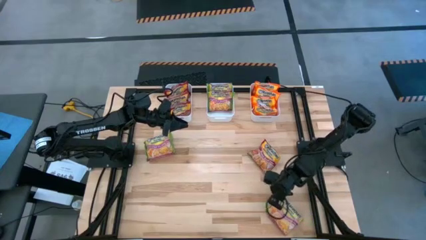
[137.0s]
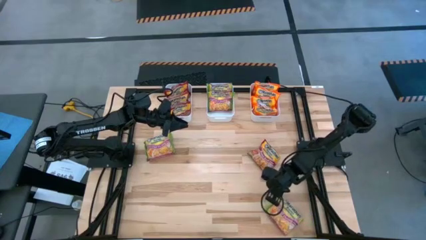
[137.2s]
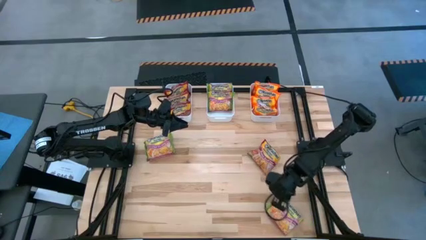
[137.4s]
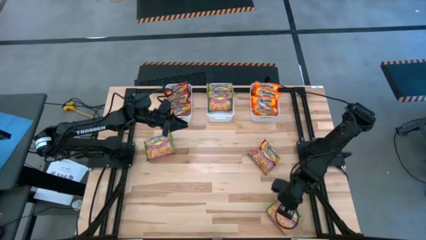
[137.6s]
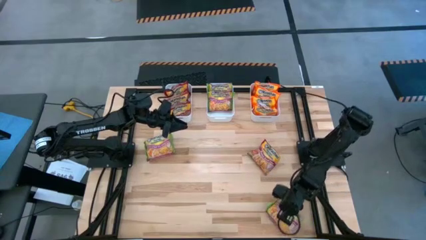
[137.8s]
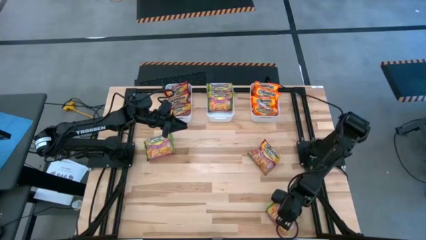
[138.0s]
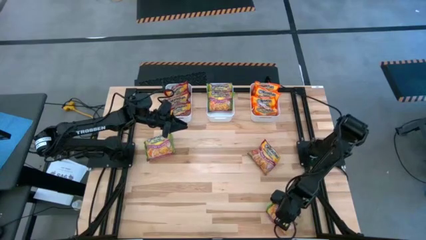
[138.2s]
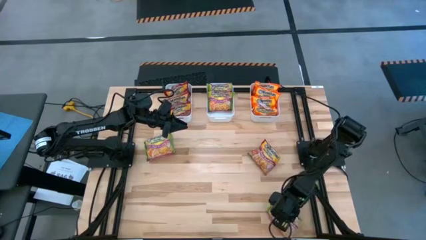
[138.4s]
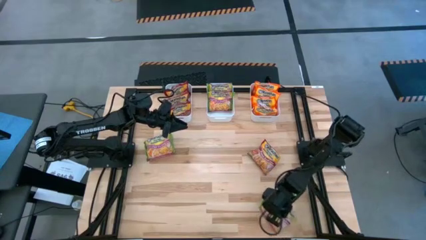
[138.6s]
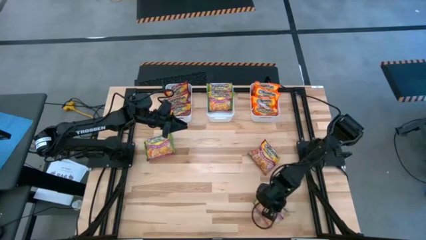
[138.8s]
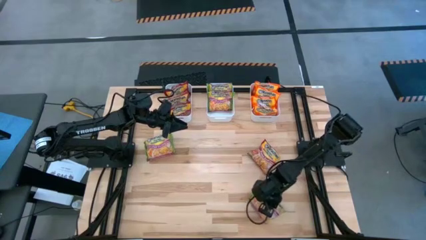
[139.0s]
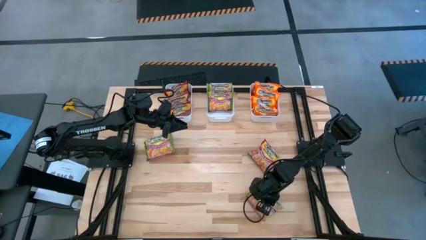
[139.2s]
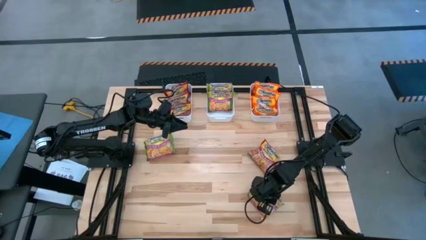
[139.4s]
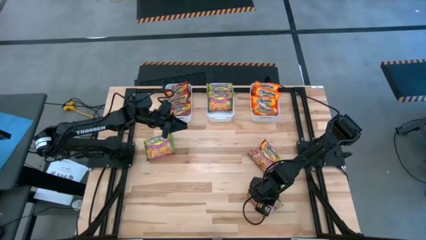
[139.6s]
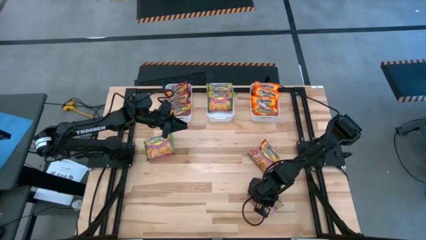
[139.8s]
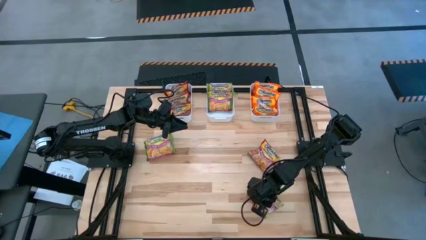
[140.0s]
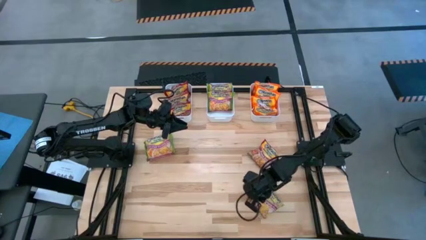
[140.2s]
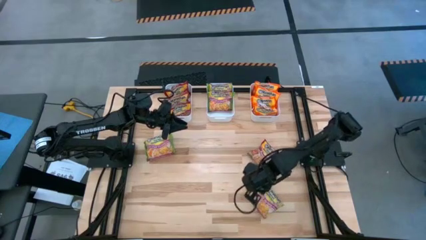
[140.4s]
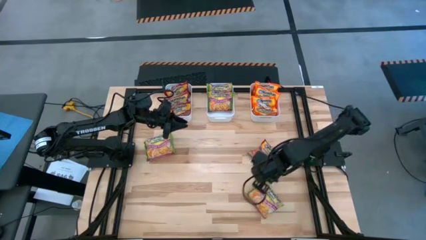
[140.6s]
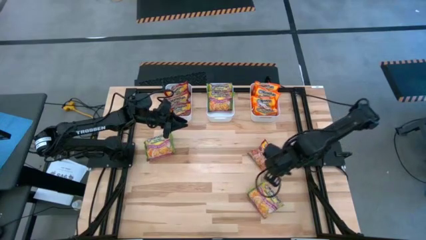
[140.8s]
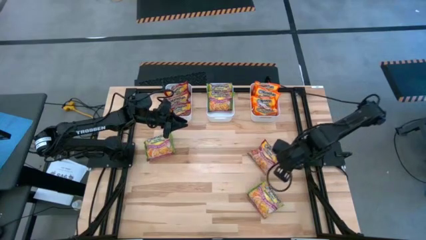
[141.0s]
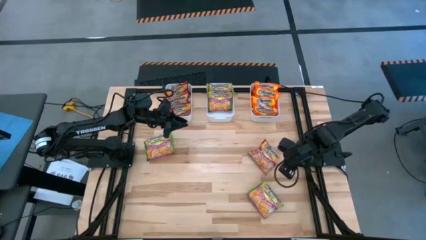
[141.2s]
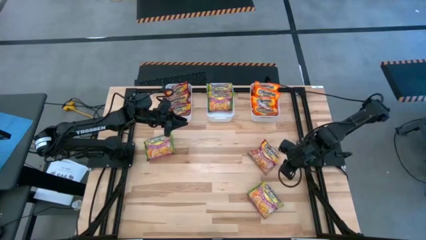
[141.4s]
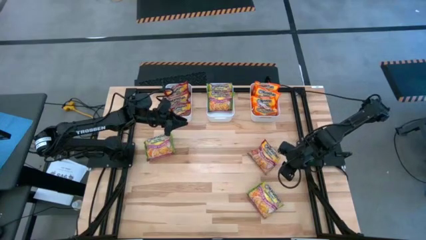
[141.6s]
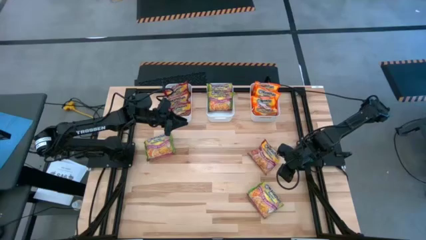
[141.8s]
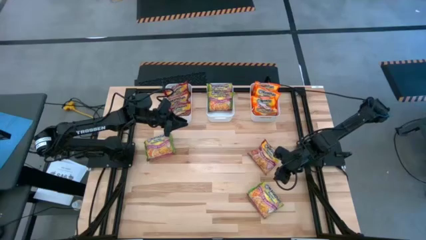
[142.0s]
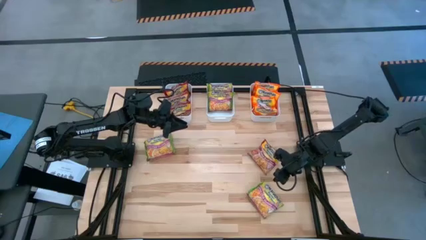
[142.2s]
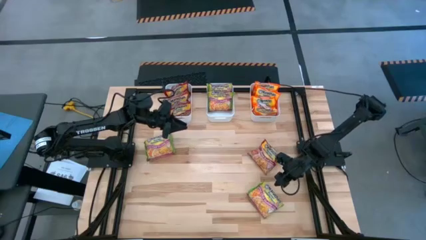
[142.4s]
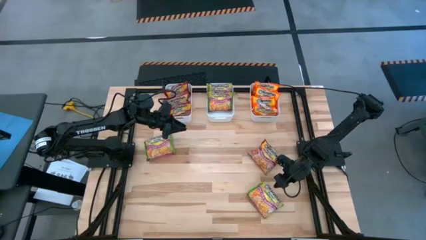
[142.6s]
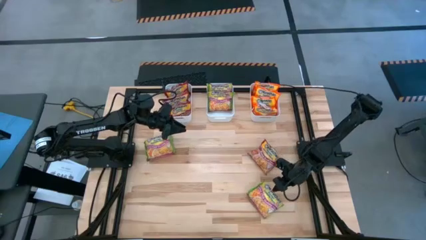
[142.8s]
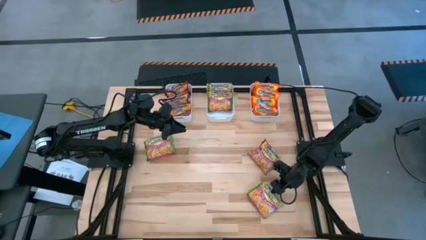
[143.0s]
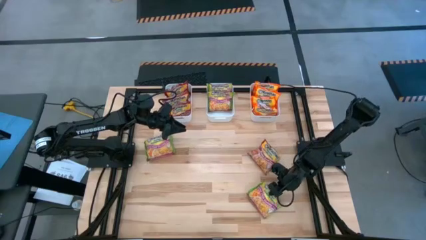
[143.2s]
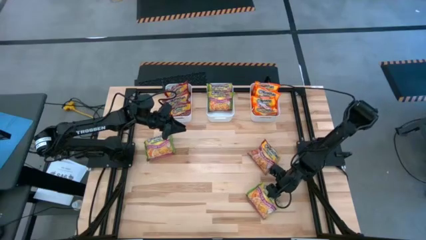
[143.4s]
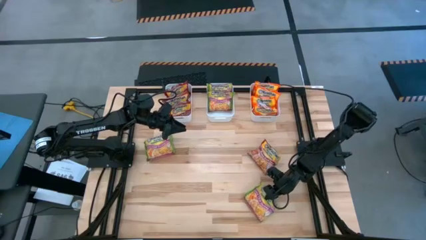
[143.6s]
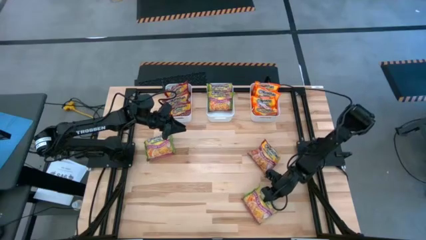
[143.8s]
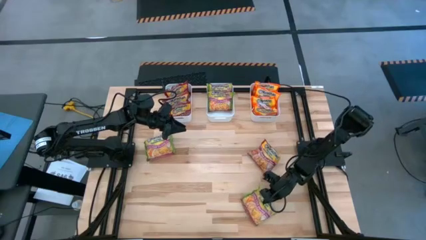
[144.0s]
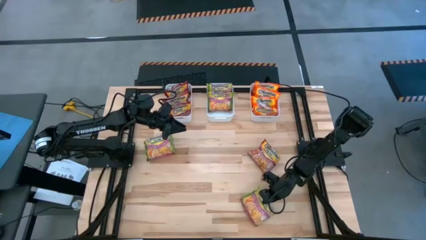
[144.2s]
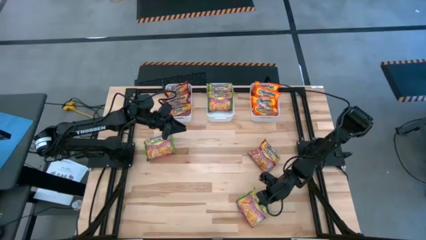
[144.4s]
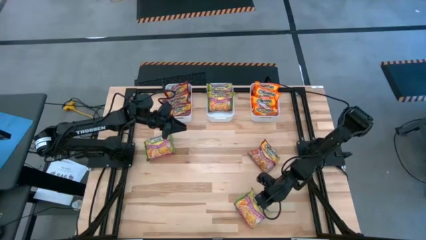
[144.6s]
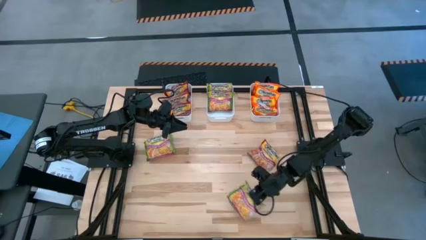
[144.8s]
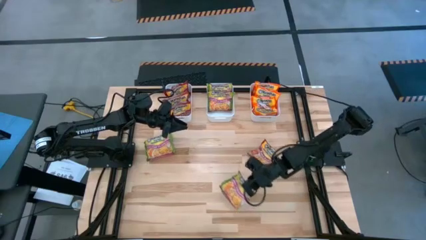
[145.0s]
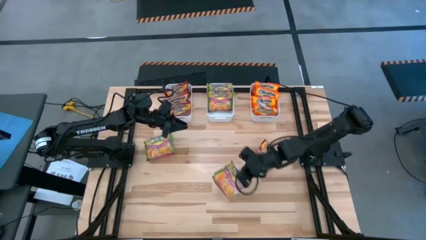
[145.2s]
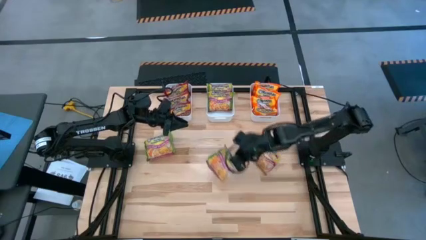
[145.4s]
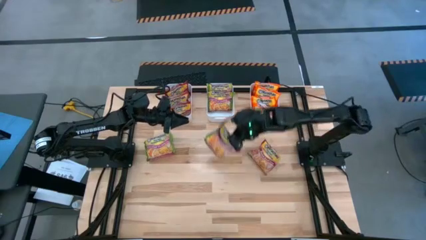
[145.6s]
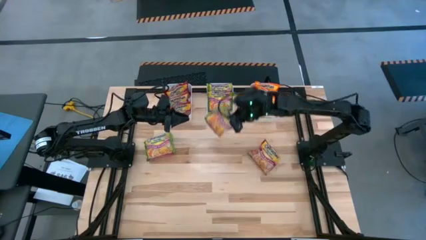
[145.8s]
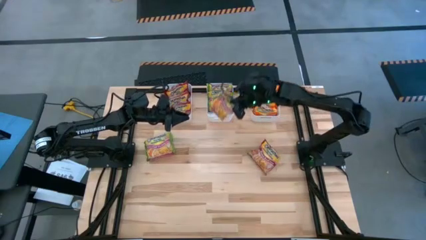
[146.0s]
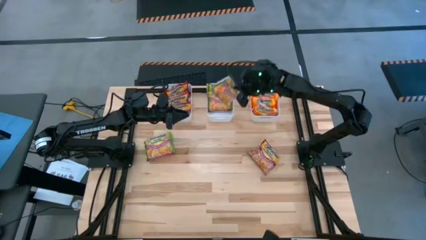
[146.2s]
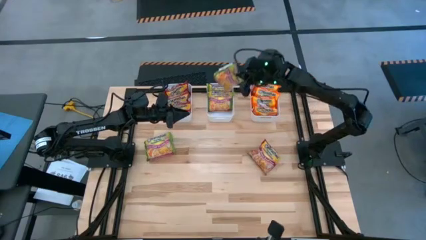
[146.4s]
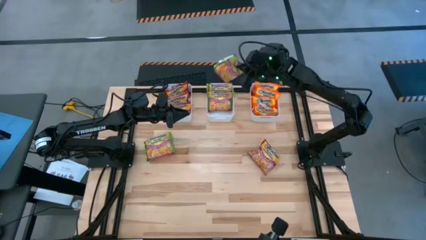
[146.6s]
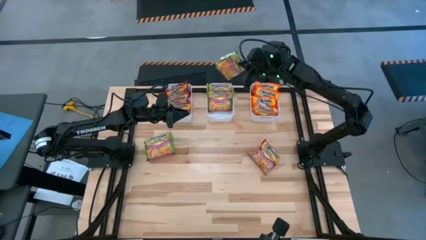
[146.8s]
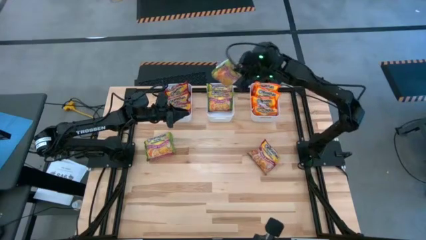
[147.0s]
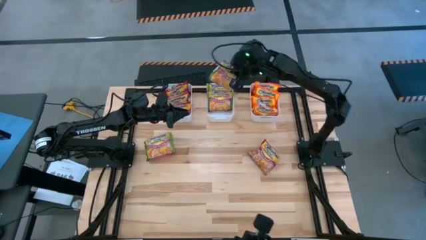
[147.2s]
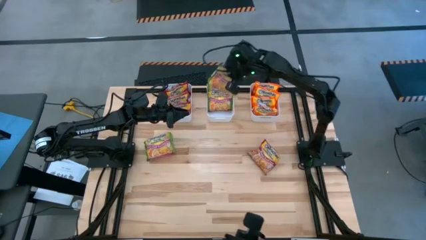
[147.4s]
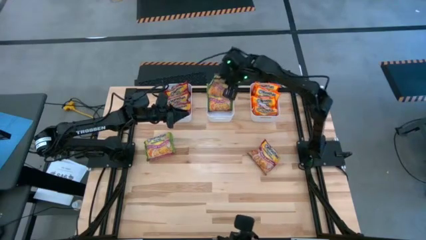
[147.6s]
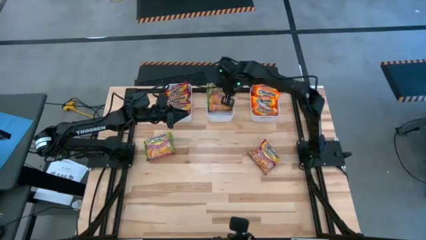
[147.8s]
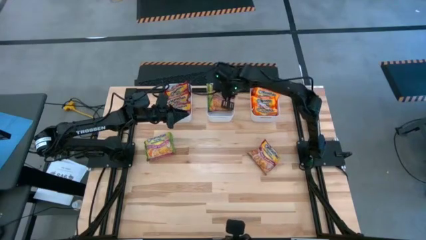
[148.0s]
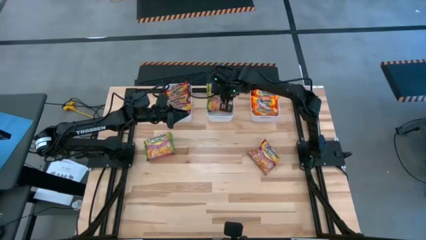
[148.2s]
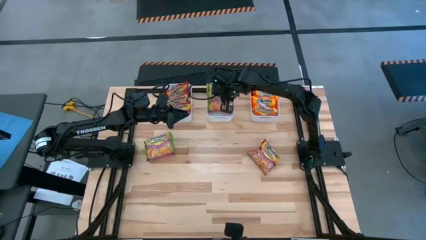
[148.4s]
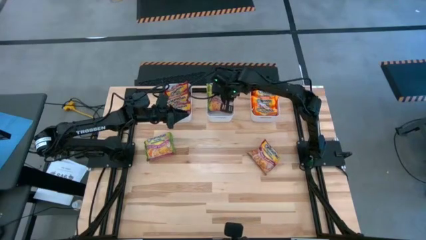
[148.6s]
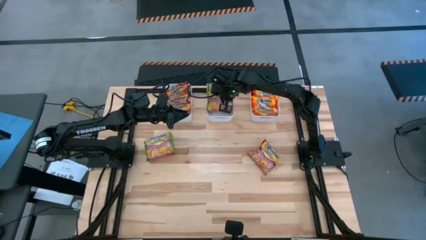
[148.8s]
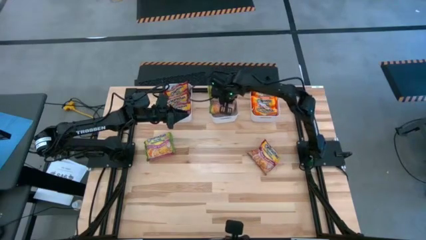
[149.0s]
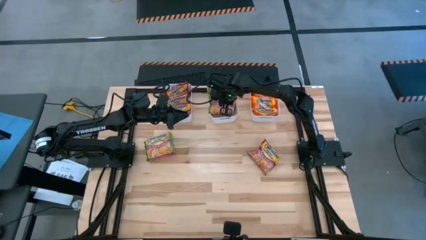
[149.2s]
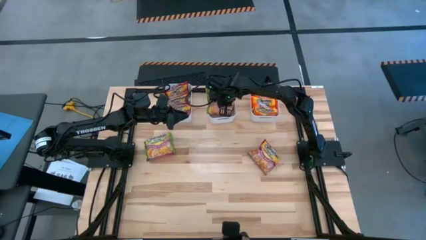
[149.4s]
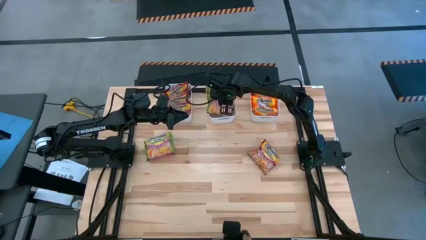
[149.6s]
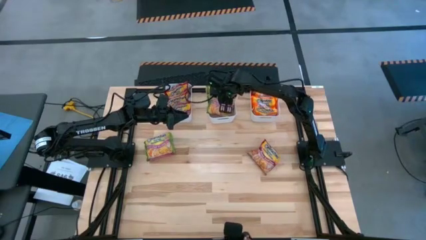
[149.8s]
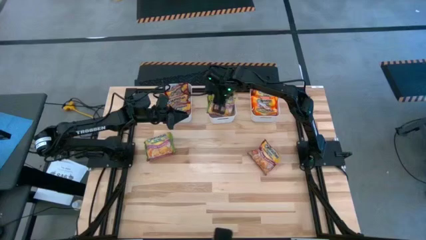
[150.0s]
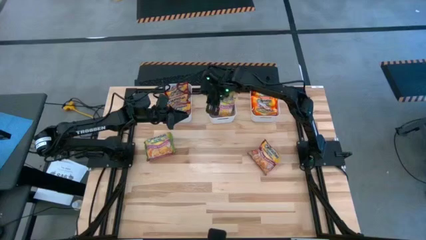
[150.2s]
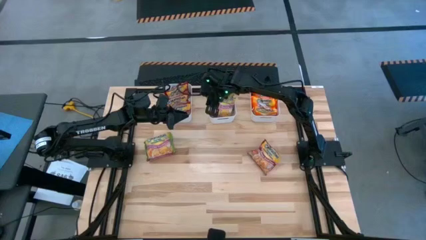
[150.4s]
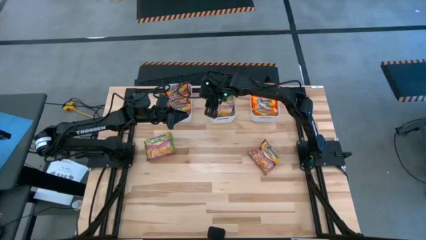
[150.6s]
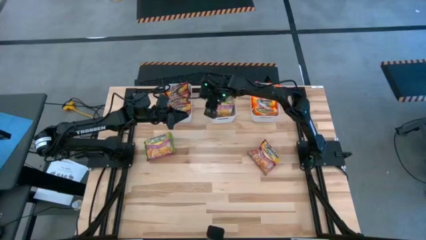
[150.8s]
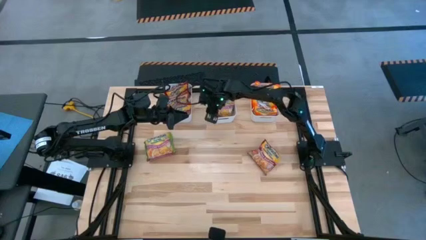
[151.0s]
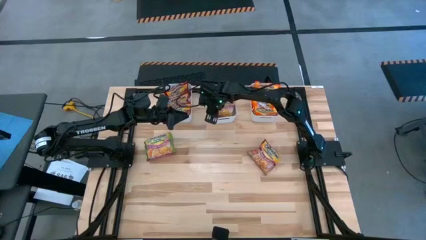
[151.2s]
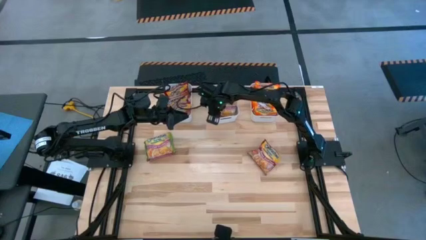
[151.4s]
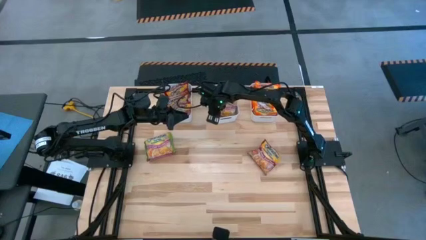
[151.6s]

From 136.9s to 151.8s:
Task: Sort Maruchan noodles
Put the green noodle pack into the middle white bin
